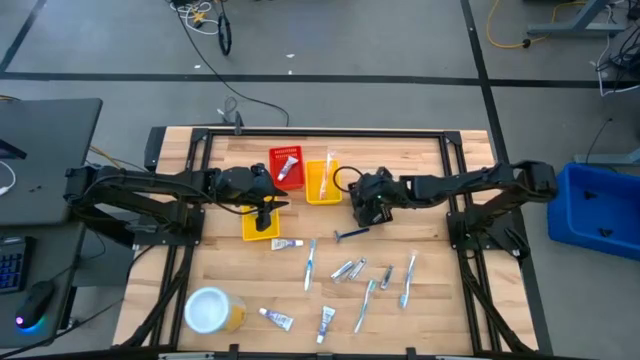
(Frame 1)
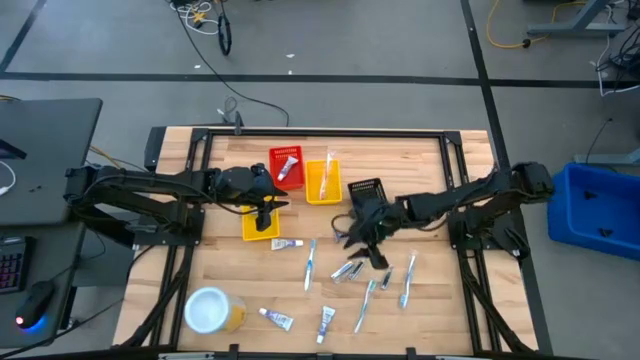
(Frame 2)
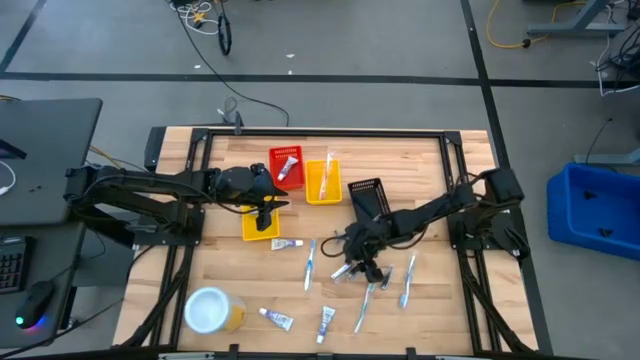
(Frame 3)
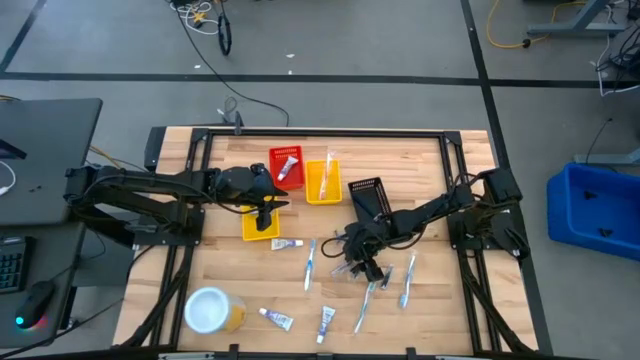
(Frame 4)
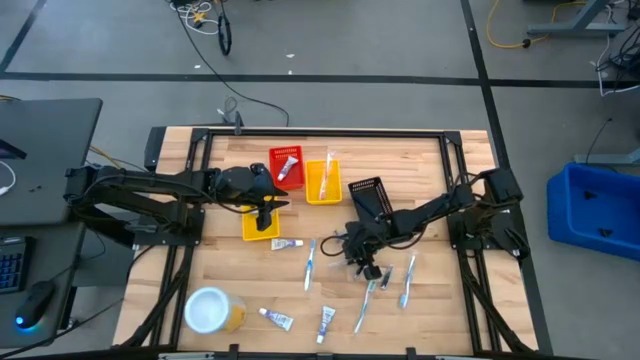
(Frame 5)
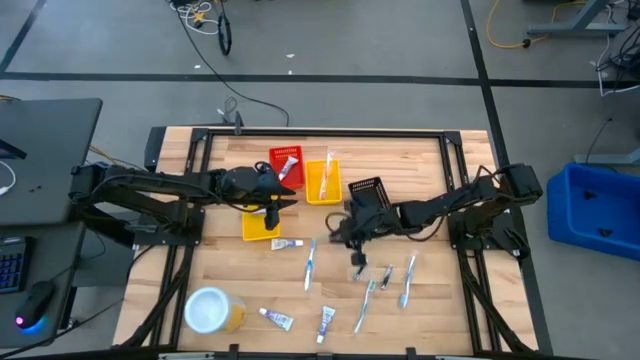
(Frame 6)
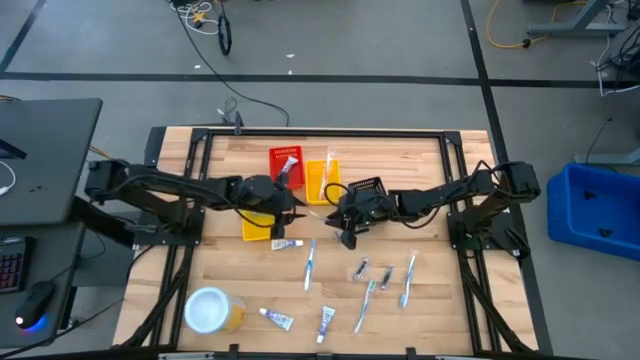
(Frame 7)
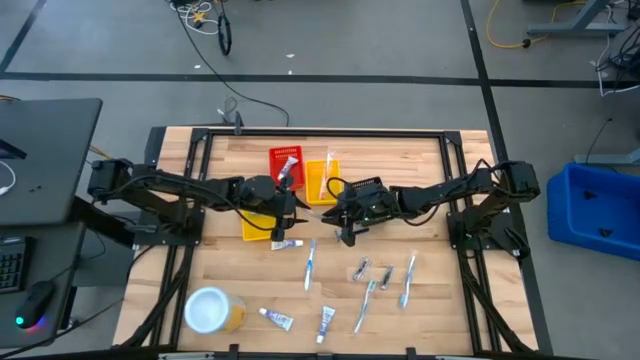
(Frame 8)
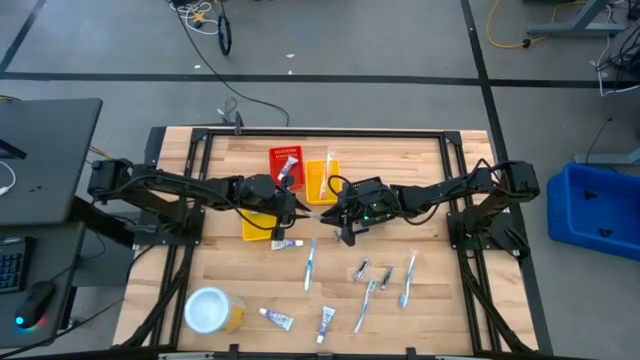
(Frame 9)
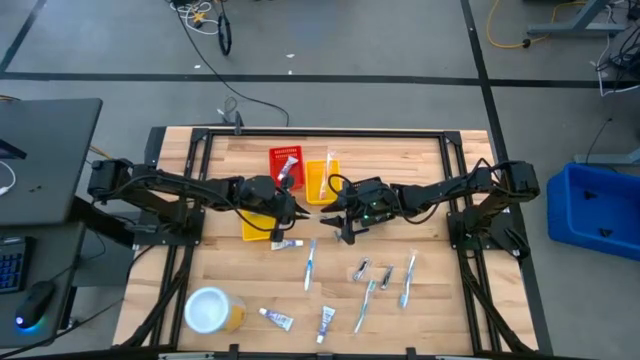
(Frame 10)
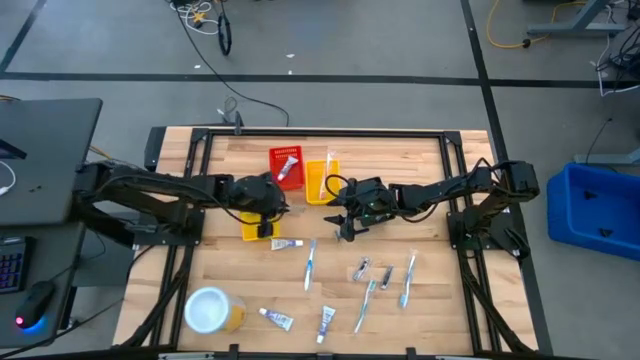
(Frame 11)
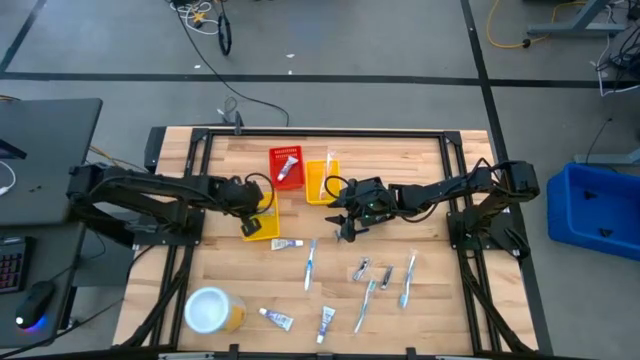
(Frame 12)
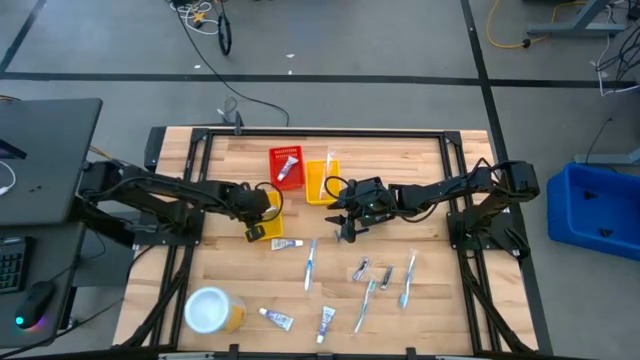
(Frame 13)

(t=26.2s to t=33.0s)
Task: Pick & Place Travel size toiletries
Put the nail cutter into the left yellow bin

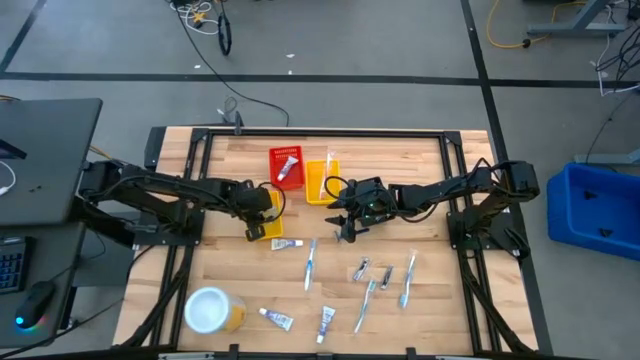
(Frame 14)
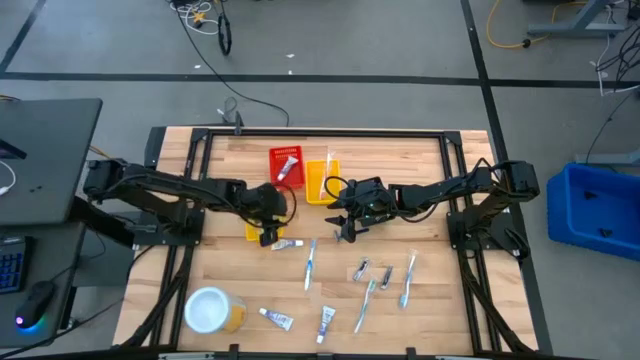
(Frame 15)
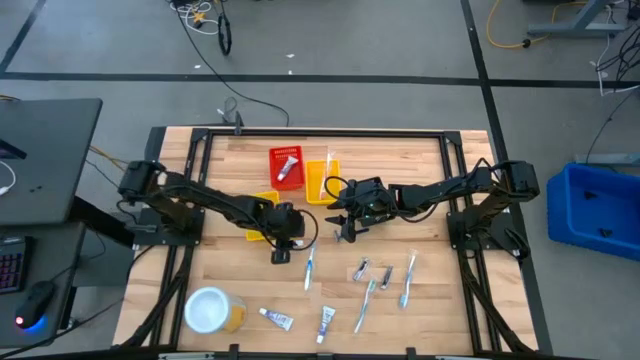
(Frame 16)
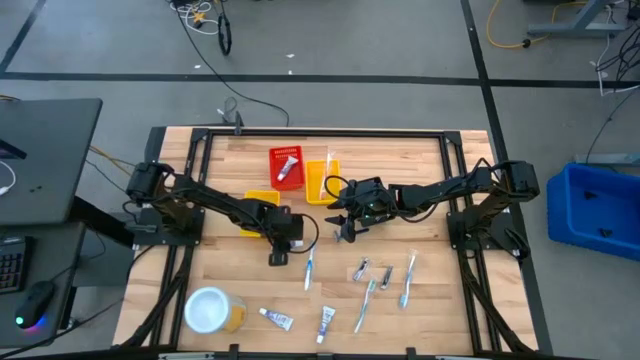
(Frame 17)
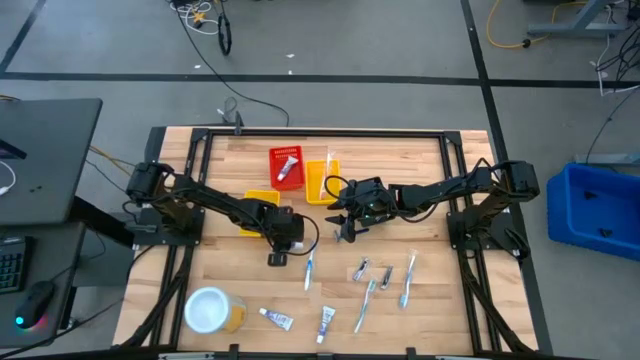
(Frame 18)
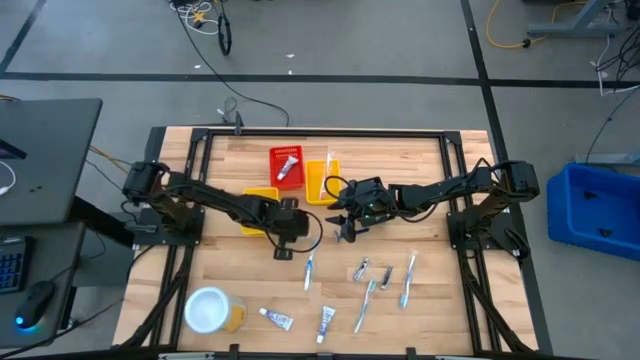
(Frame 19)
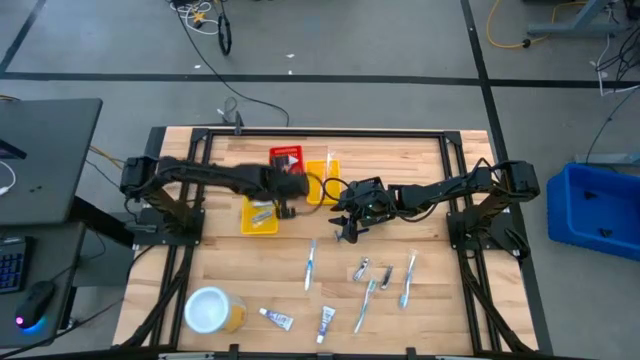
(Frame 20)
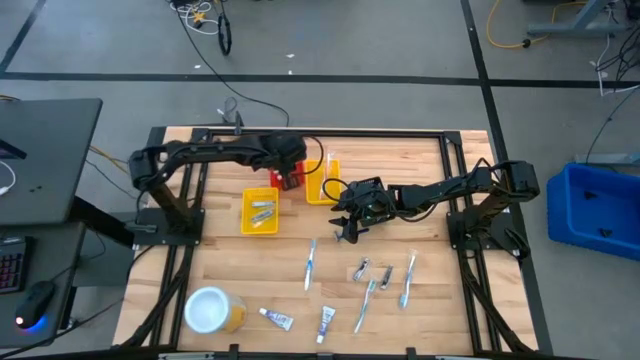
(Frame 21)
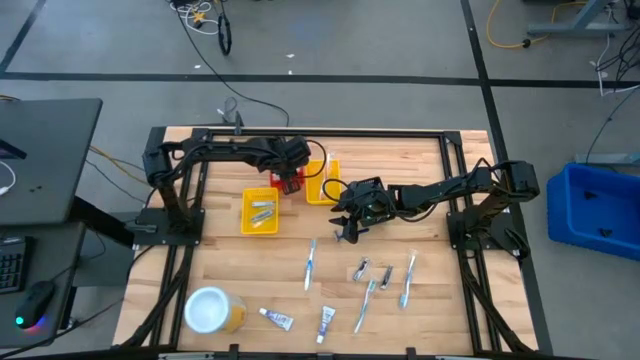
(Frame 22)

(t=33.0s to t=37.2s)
Put the toothpaste into the red bin

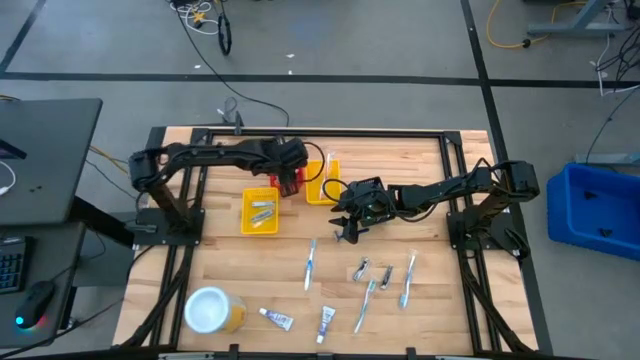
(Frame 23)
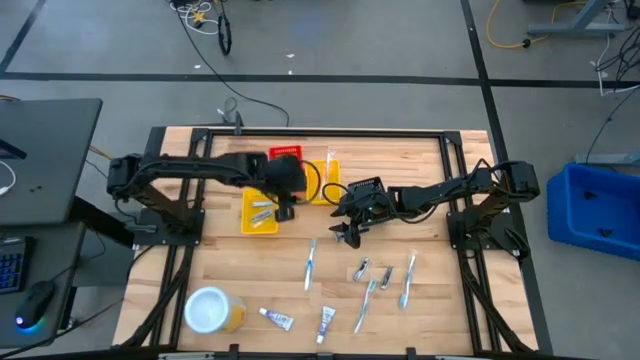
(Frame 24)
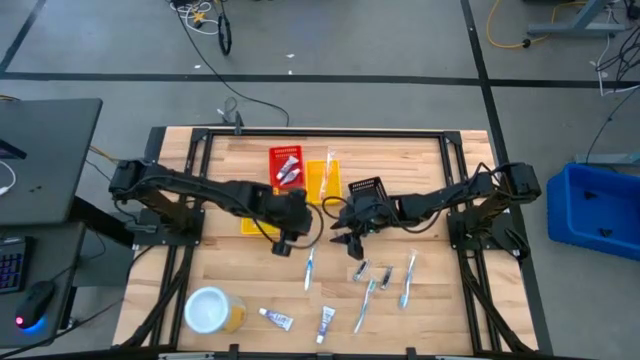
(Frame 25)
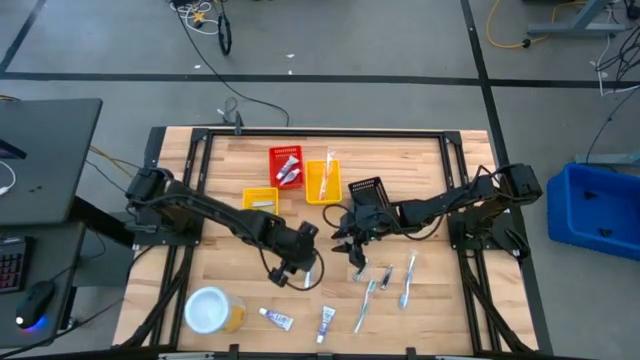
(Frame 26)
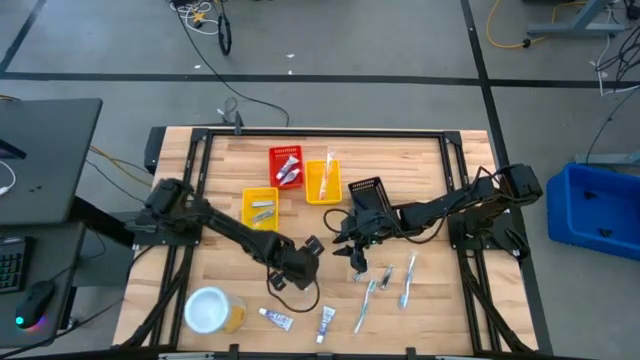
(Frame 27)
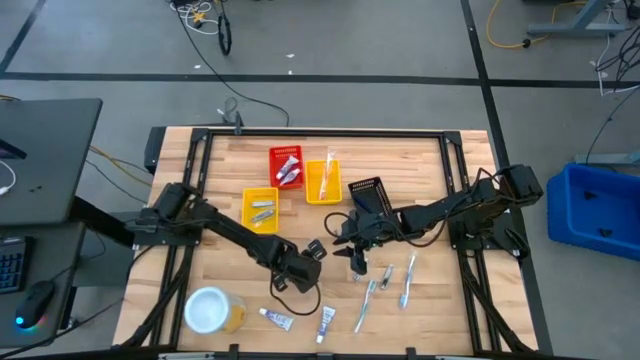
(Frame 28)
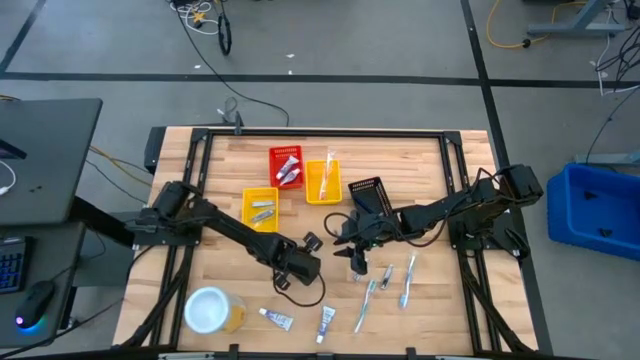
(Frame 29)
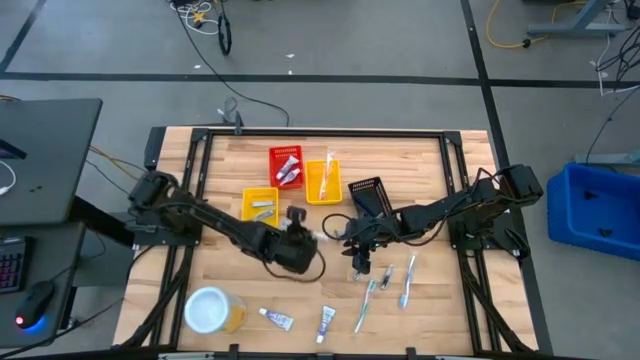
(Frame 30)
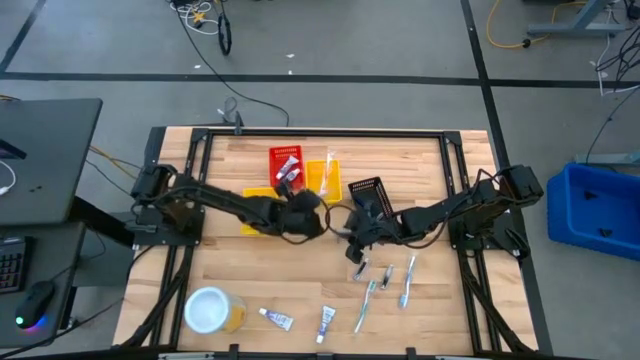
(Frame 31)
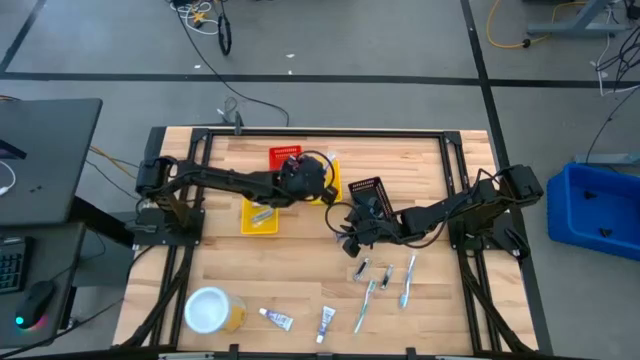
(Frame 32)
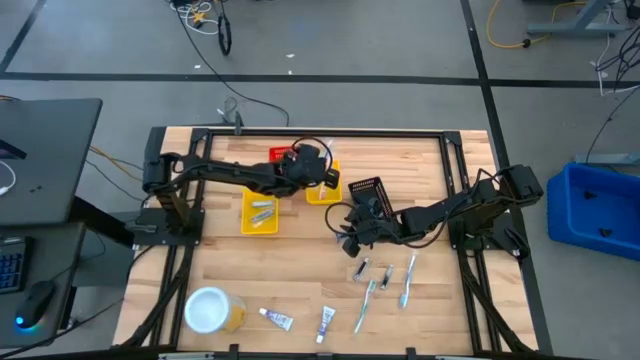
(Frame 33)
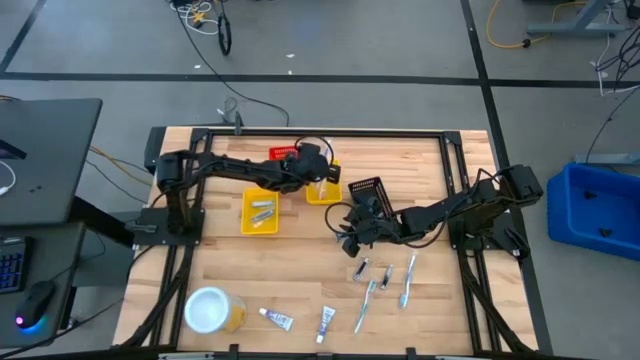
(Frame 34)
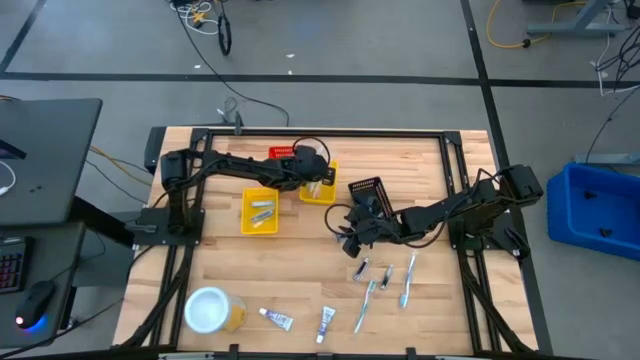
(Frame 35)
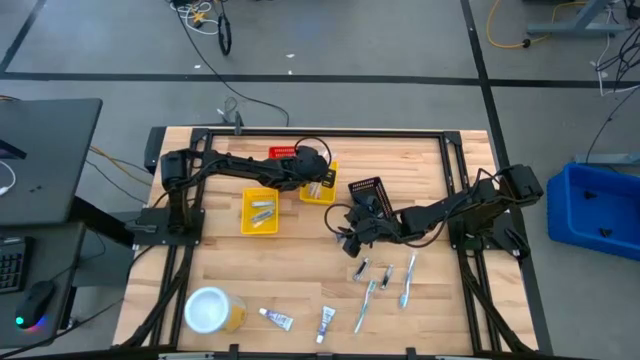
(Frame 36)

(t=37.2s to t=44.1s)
Put the blue toothbrush into the right yellow bin

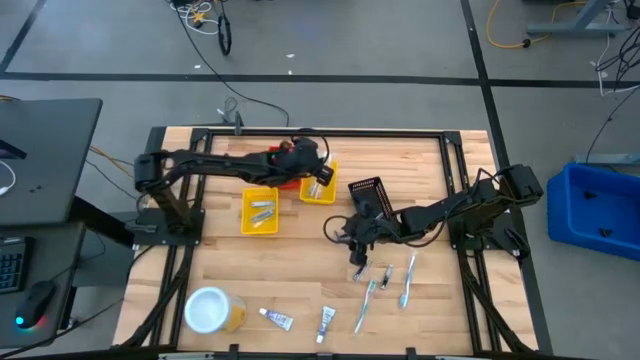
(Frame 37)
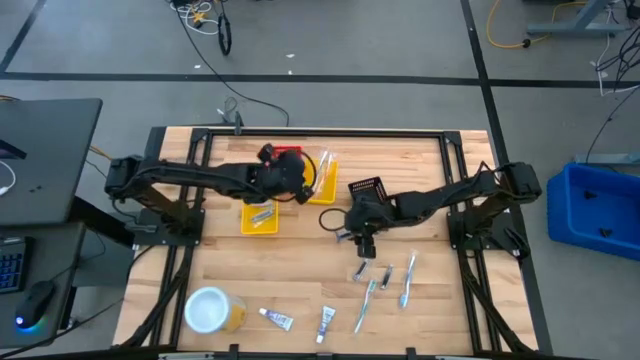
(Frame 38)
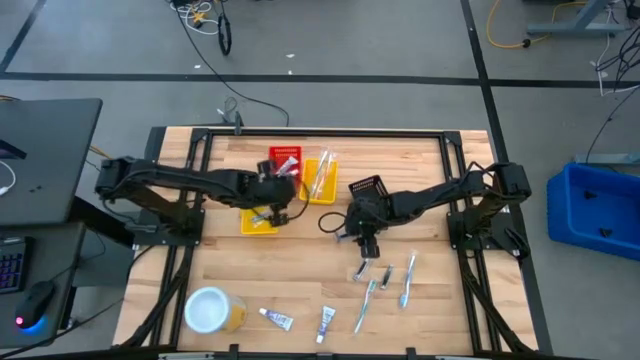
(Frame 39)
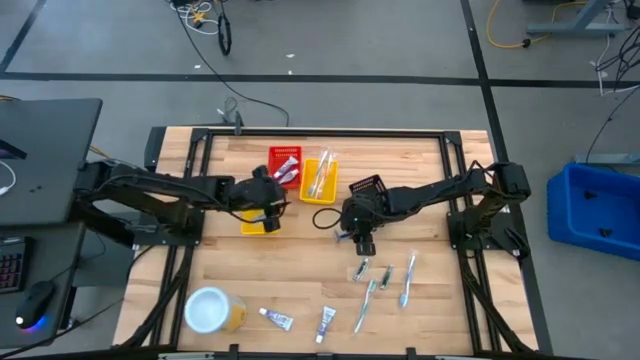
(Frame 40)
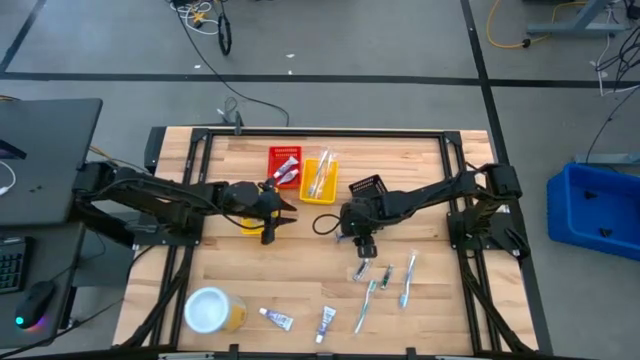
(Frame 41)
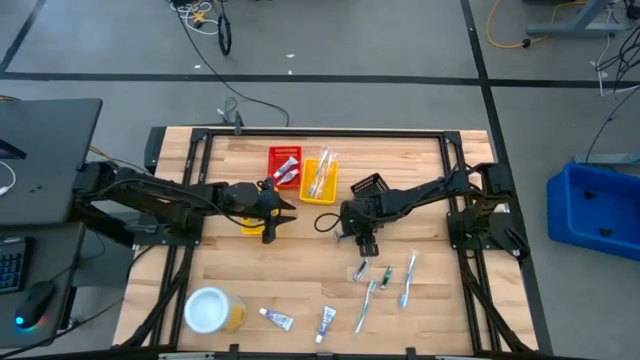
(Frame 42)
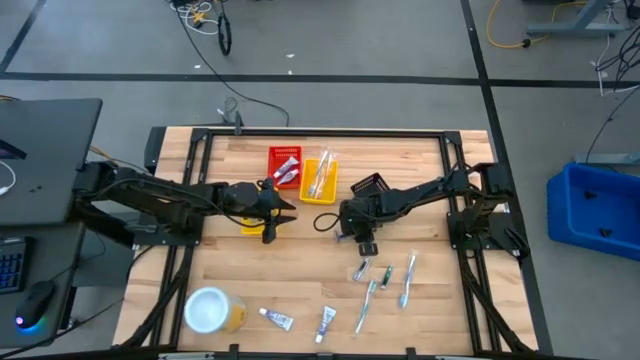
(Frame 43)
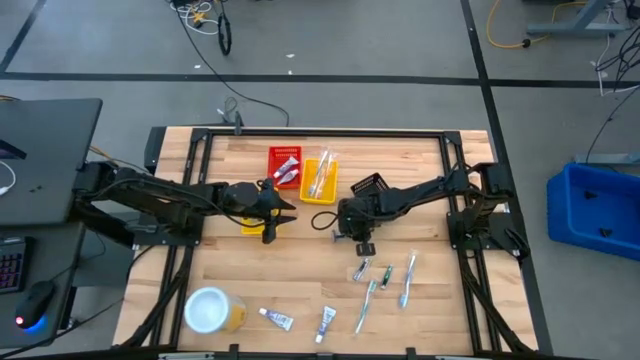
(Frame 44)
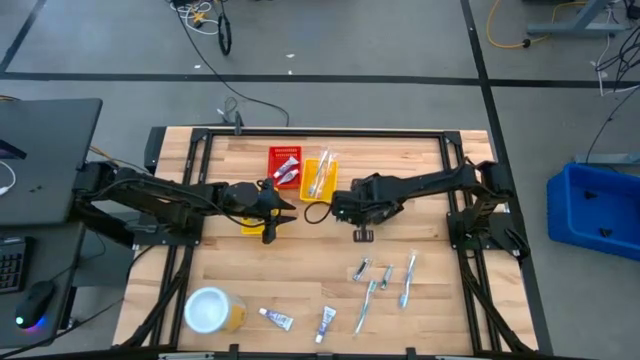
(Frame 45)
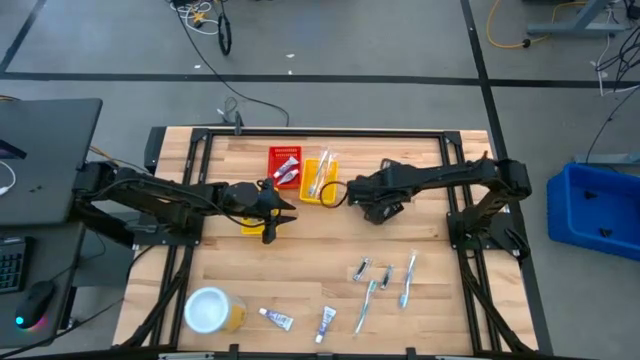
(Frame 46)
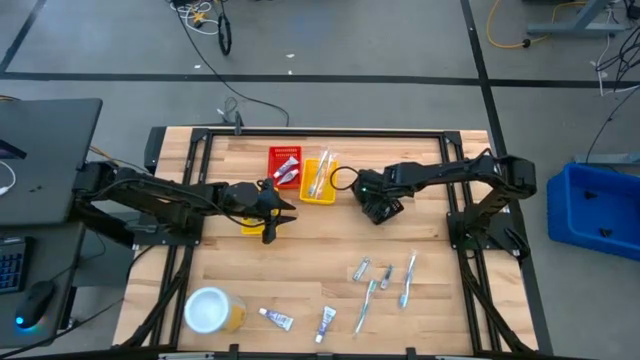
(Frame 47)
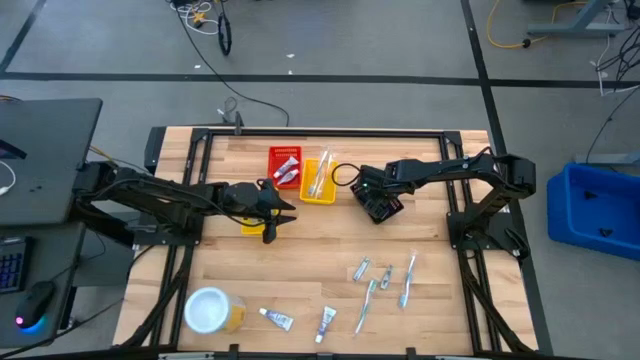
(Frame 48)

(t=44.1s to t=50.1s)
Put the blue razor into the black bin
